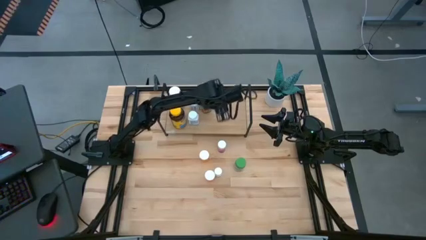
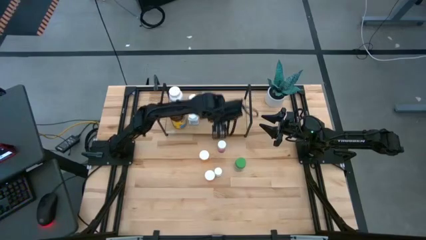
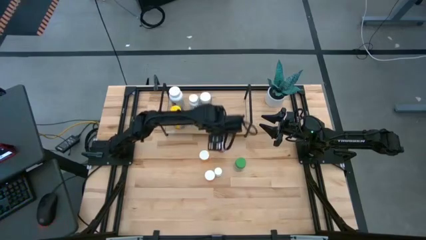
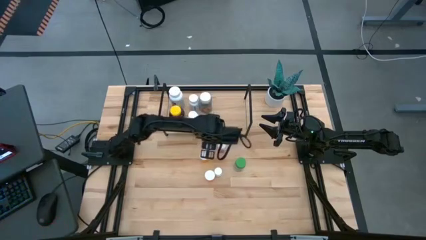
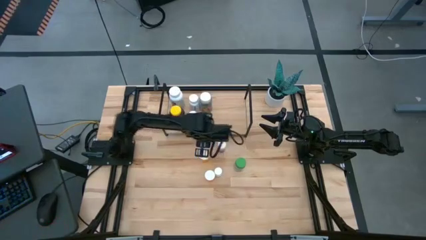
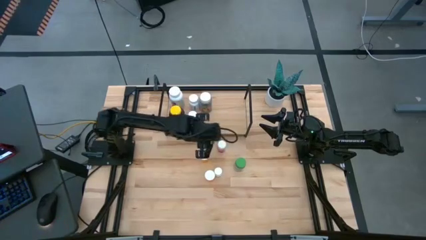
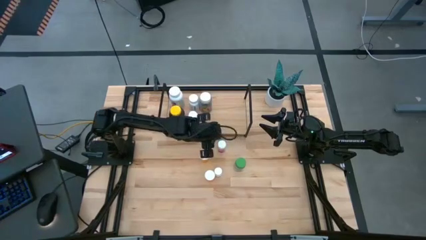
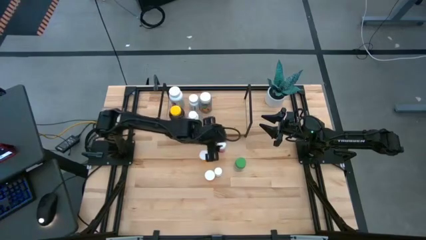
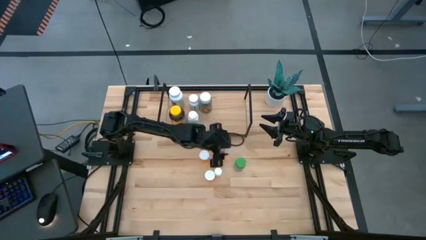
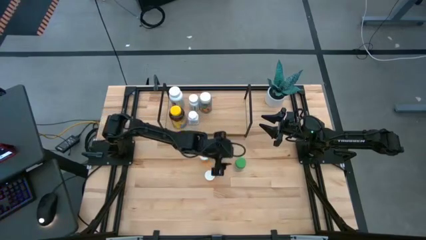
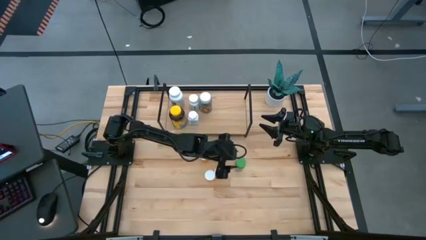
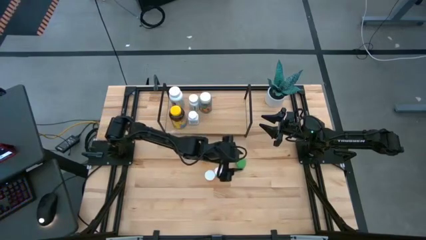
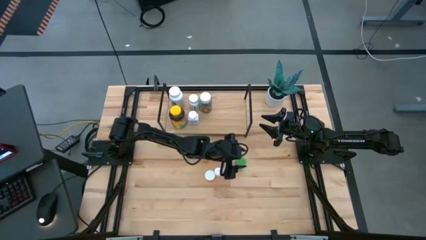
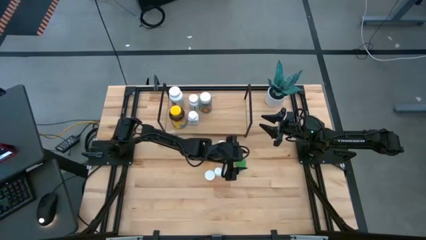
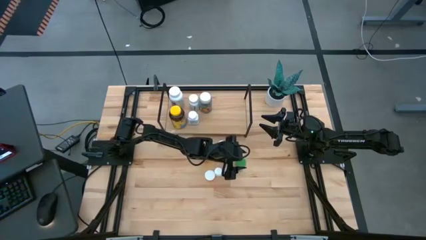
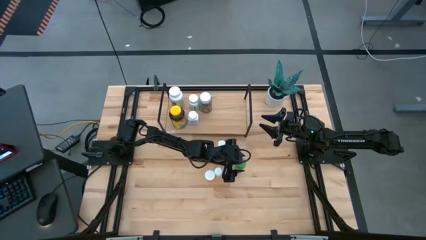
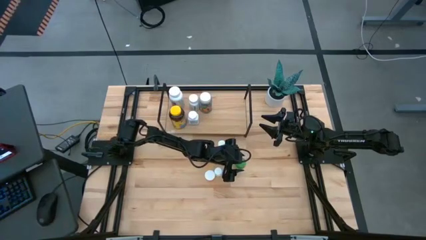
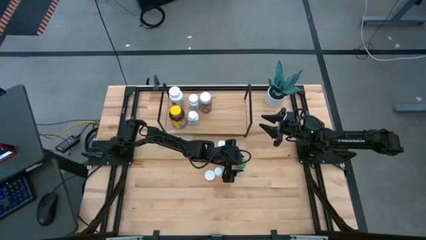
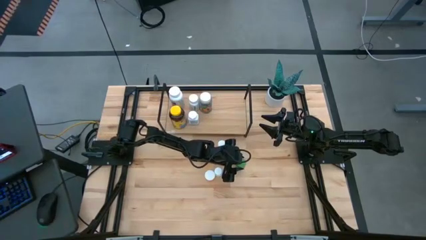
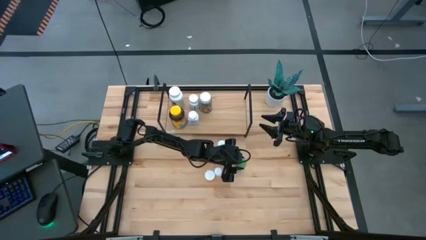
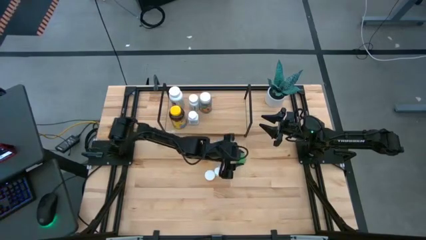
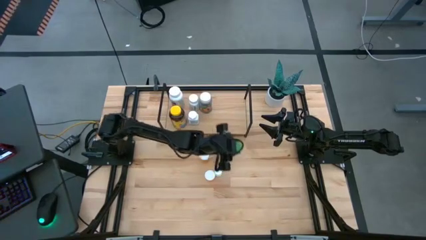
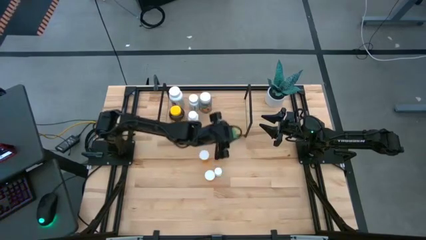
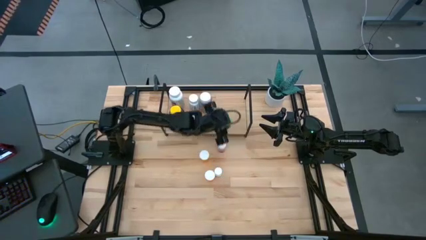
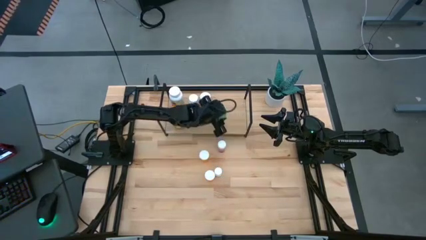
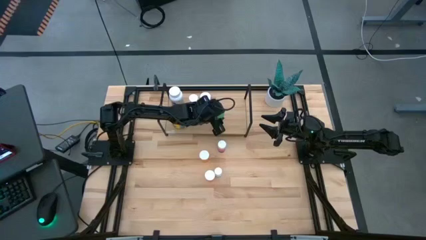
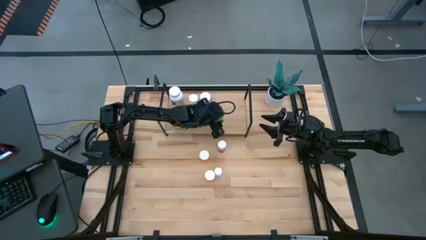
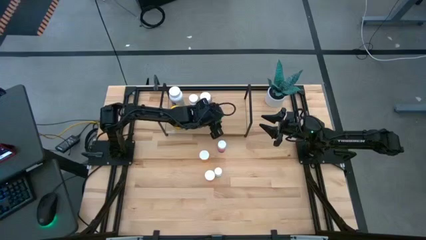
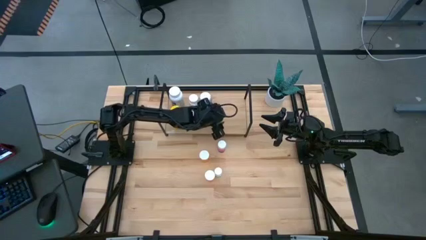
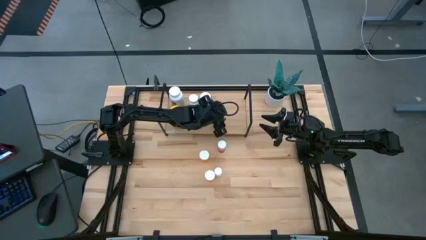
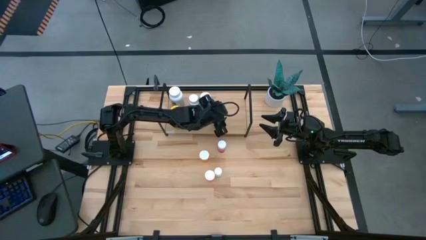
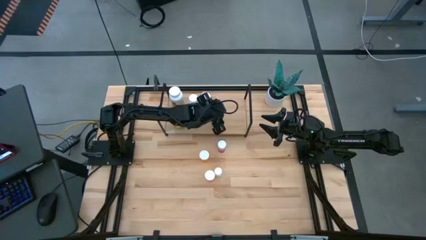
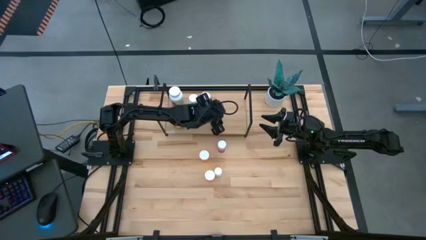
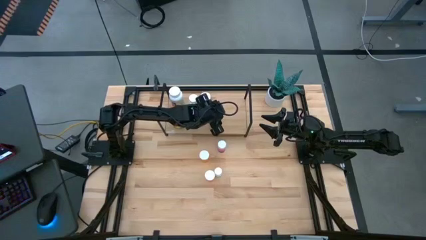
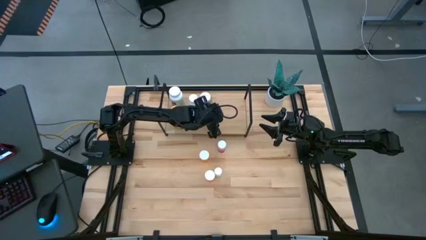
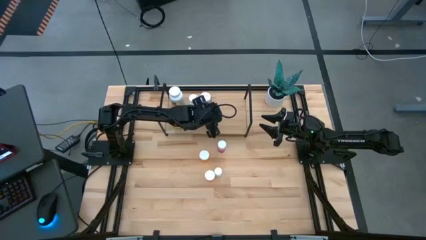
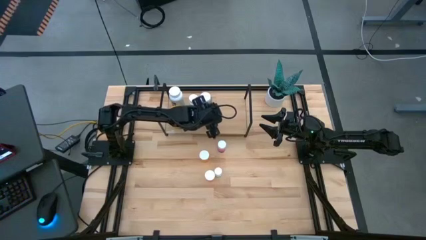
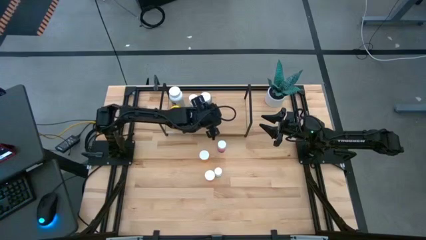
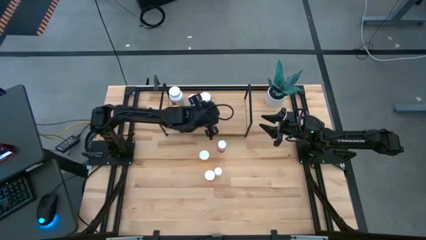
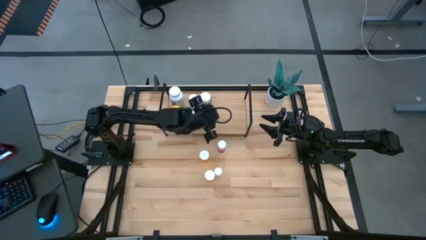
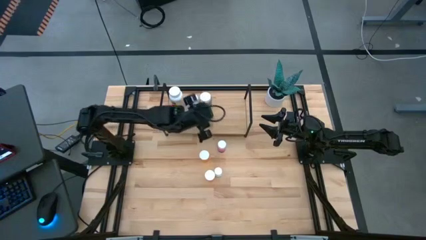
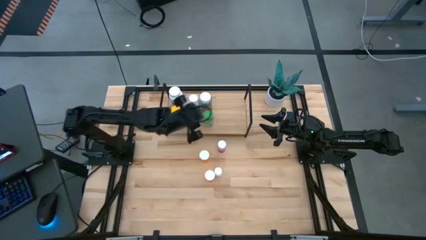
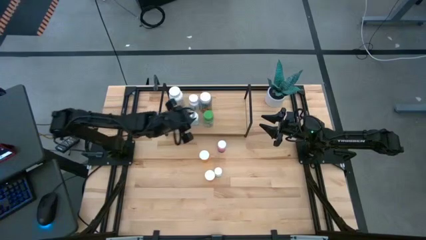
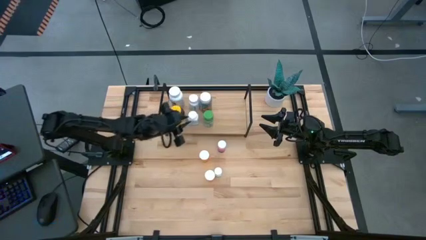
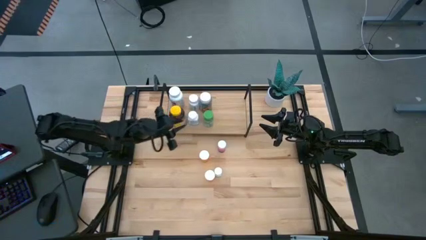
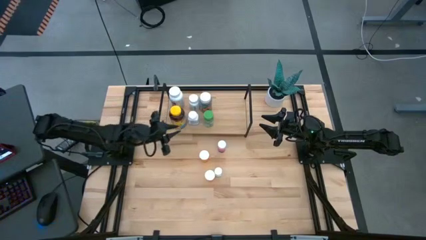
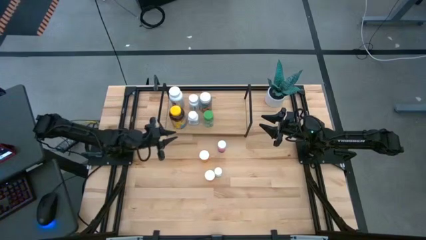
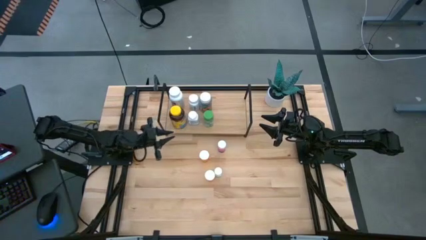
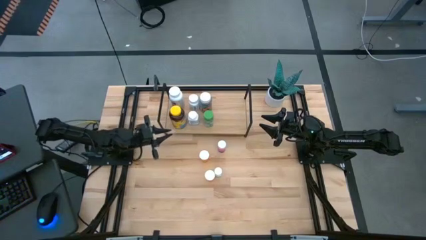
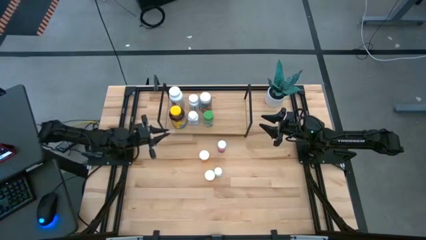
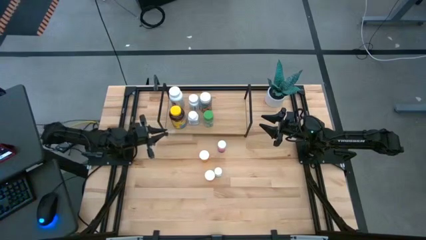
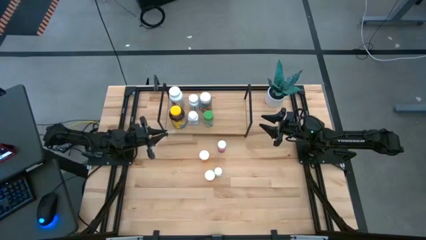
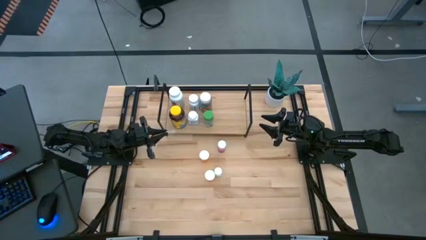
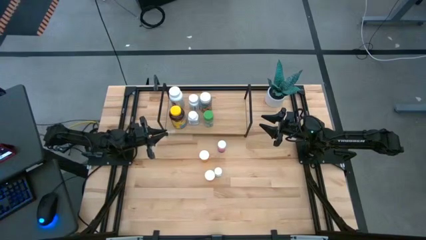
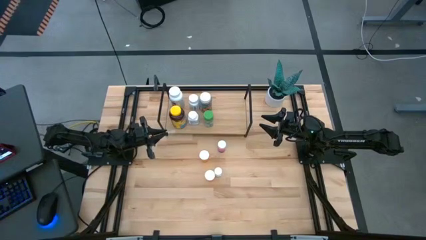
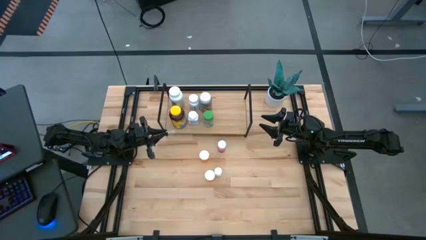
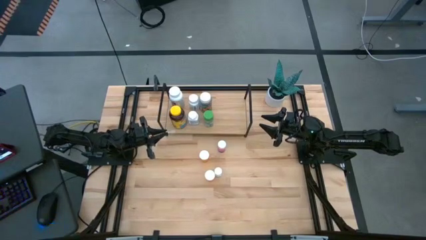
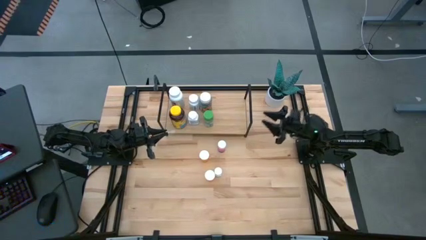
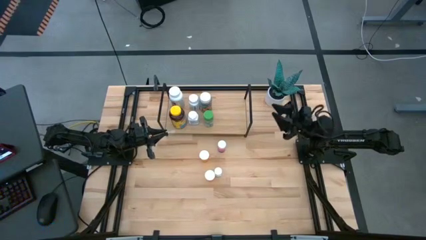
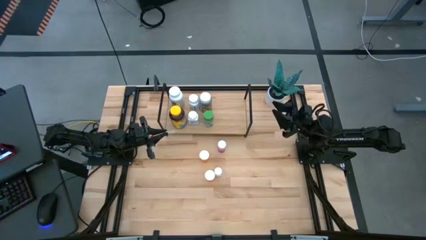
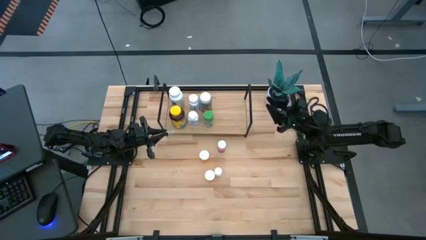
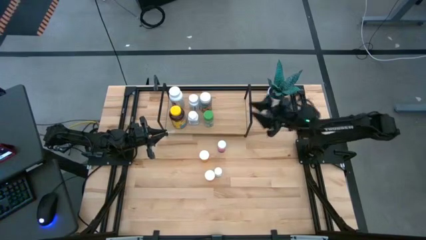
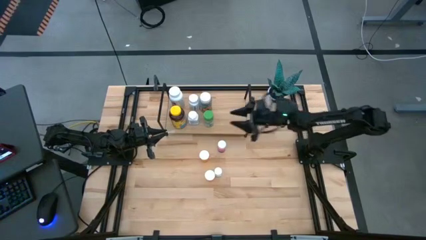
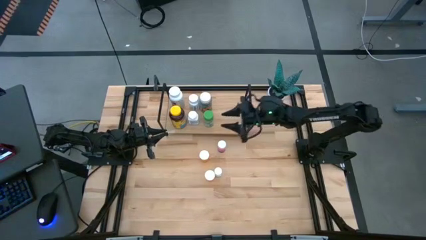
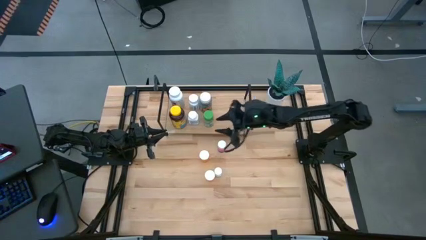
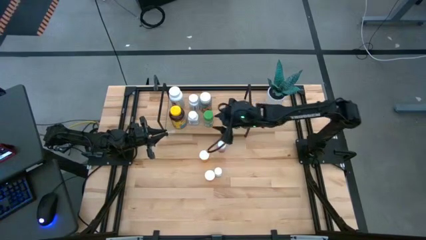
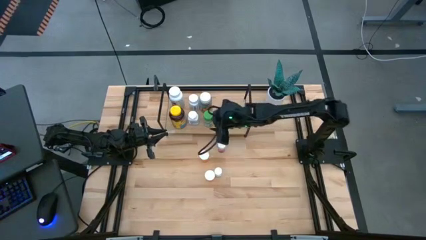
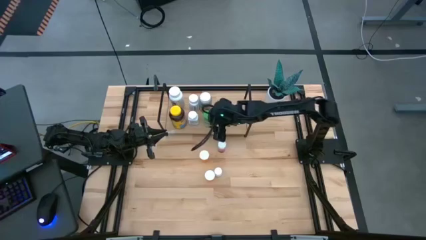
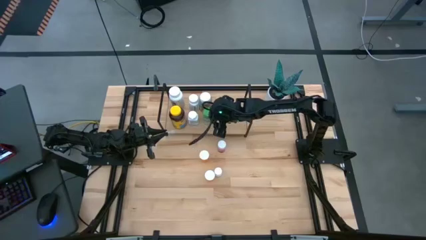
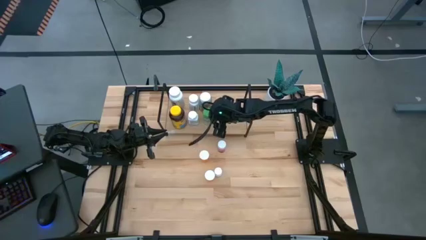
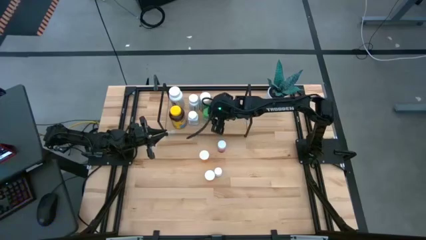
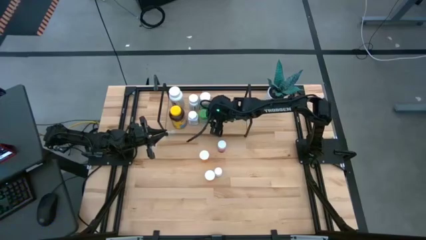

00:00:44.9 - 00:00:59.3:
Task: Pick and place medicine bottles onto shelf by color
Put the light green pill bottle on the shelf

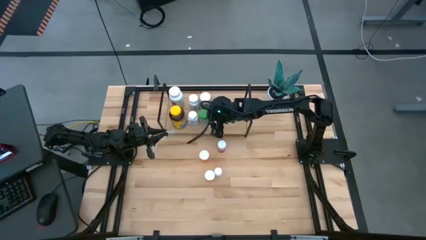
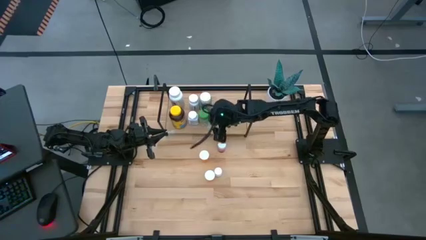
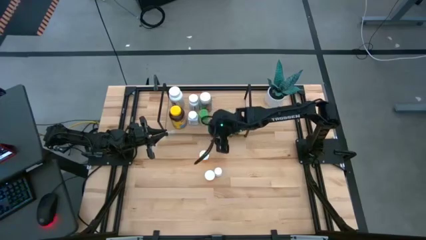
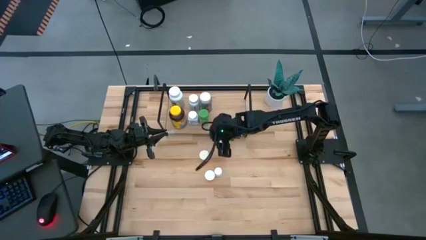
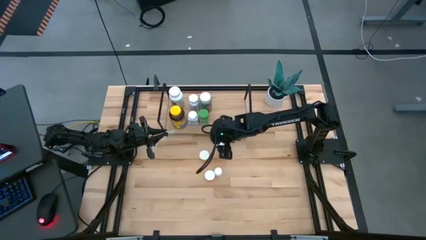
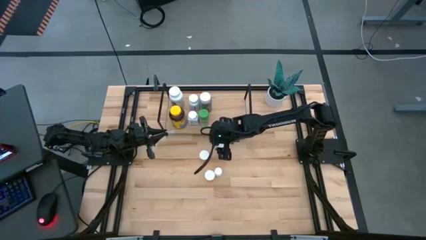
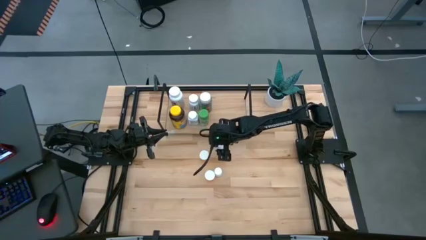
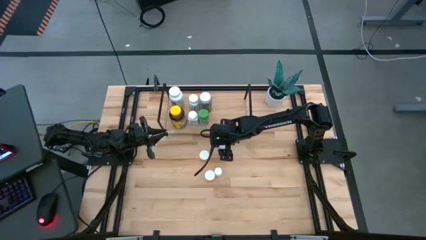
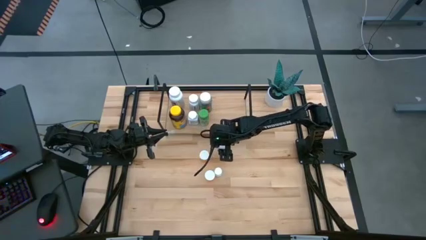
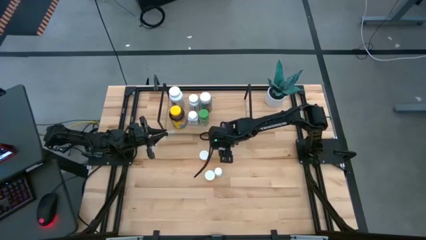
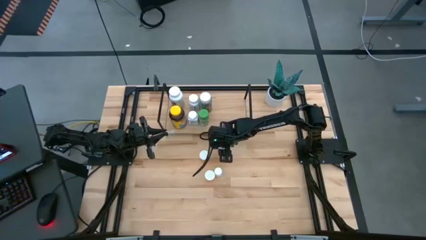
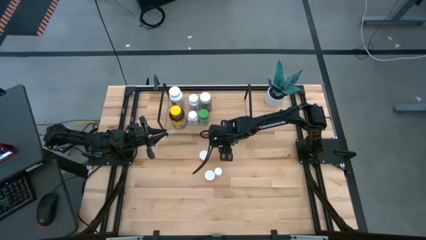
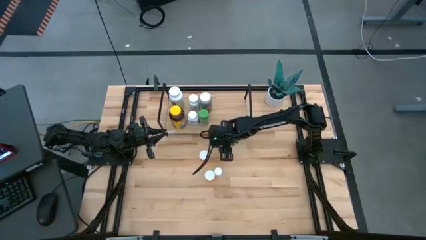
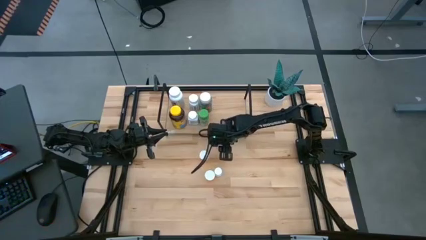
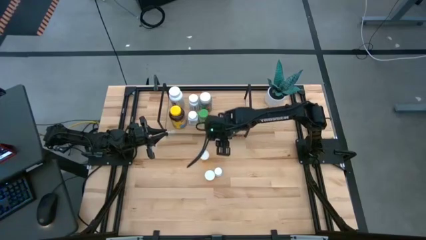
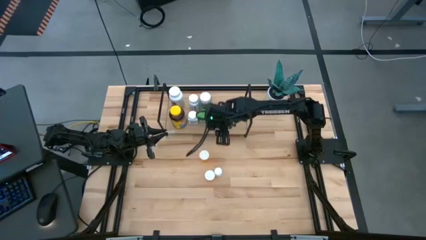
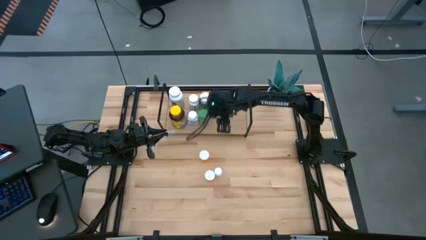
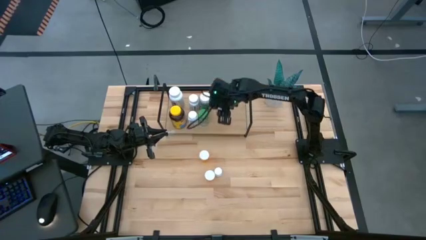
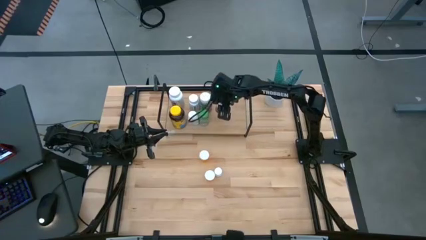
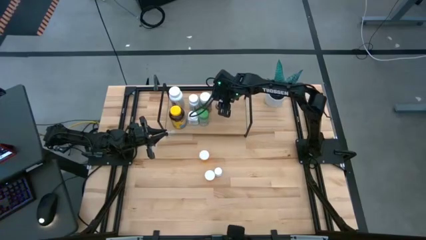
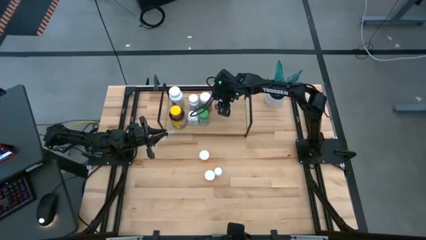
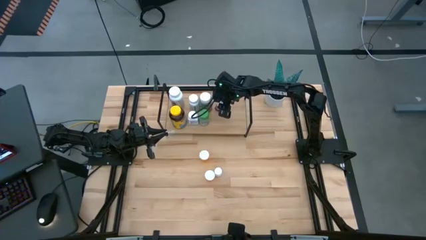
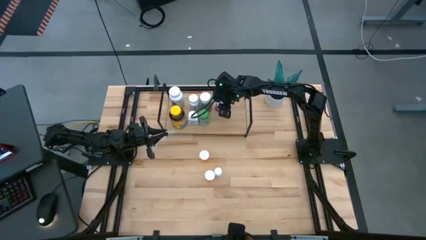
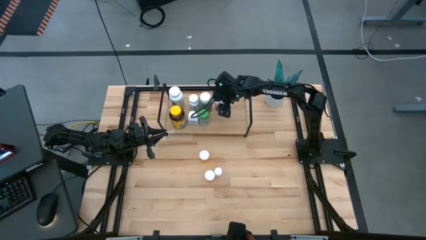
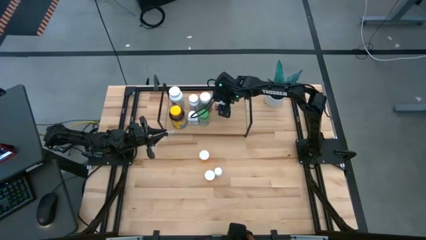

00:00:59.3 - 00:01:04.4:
Put the pink pill bottle on the shelf
